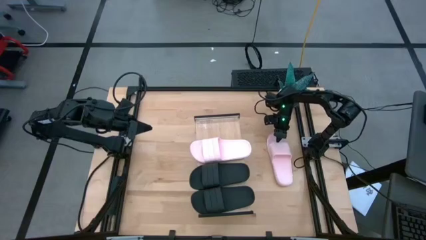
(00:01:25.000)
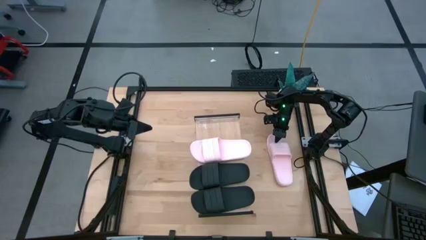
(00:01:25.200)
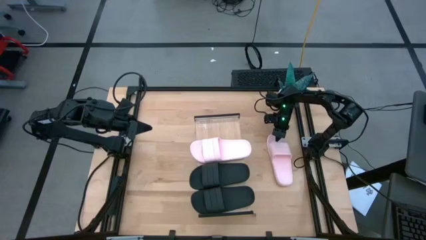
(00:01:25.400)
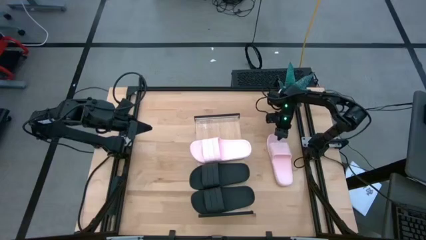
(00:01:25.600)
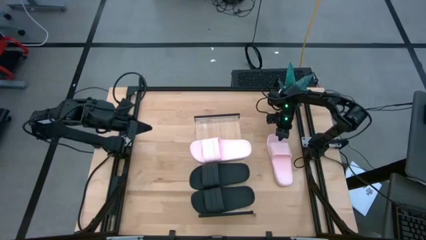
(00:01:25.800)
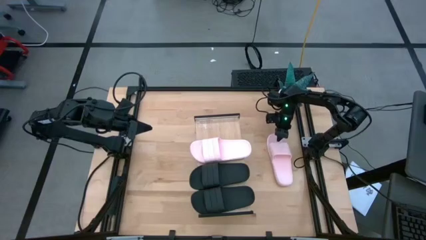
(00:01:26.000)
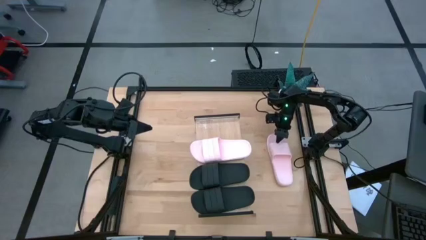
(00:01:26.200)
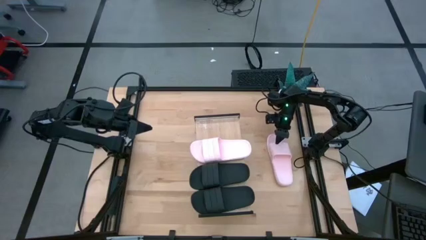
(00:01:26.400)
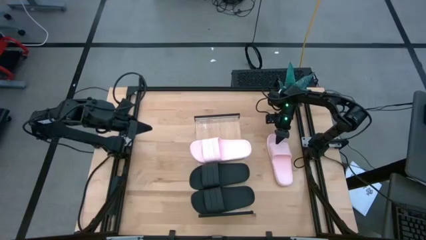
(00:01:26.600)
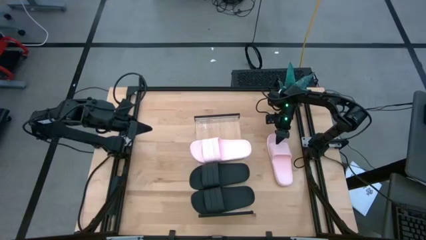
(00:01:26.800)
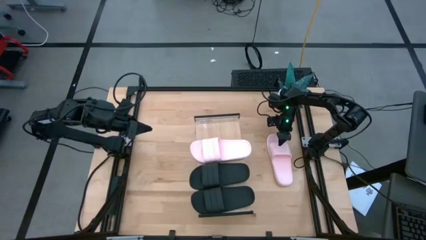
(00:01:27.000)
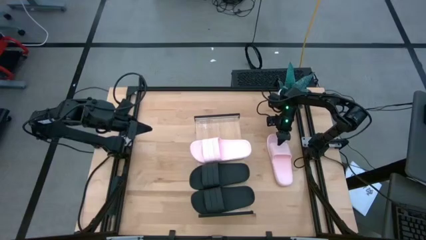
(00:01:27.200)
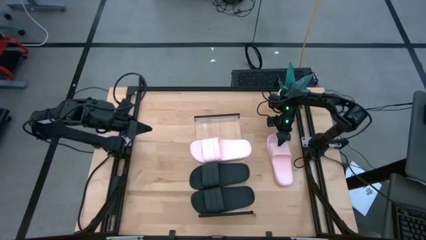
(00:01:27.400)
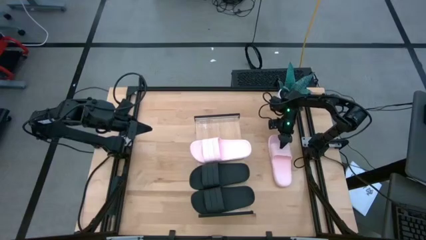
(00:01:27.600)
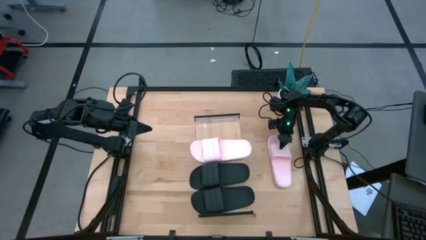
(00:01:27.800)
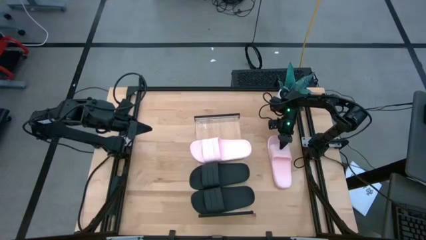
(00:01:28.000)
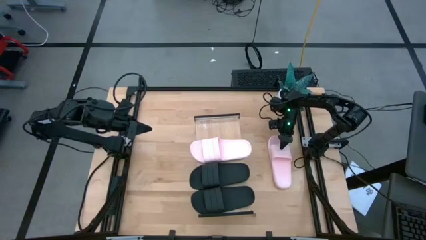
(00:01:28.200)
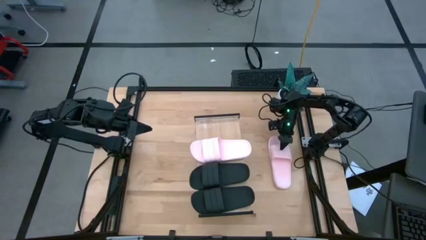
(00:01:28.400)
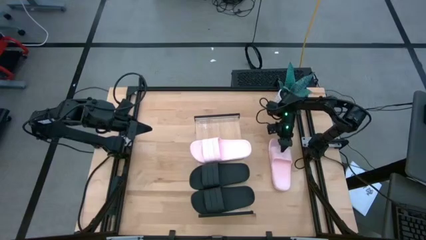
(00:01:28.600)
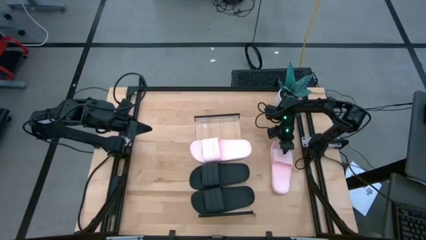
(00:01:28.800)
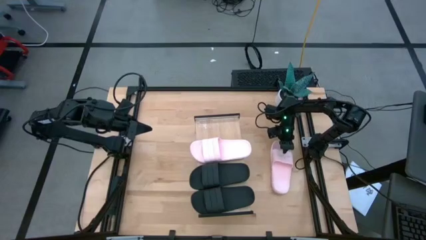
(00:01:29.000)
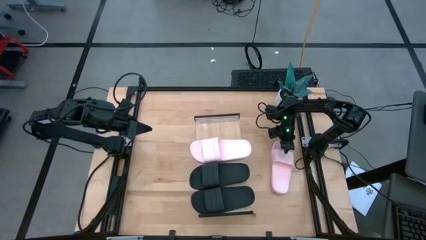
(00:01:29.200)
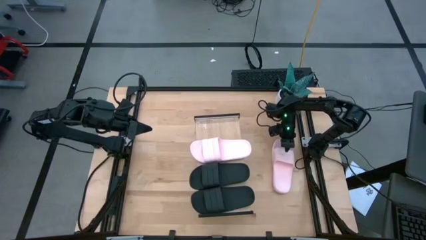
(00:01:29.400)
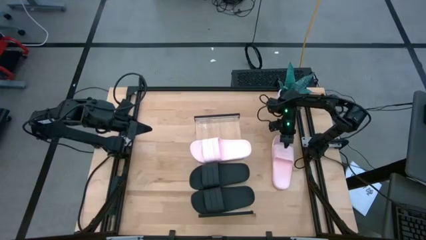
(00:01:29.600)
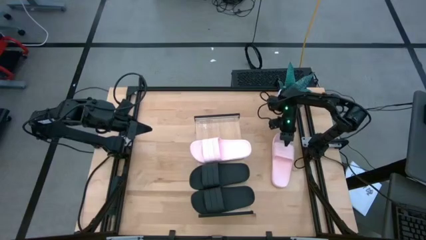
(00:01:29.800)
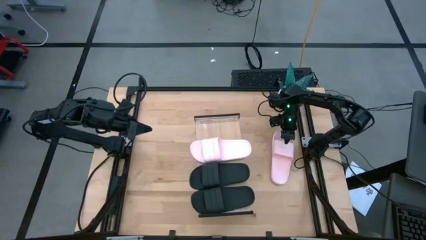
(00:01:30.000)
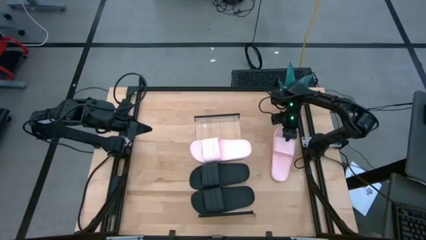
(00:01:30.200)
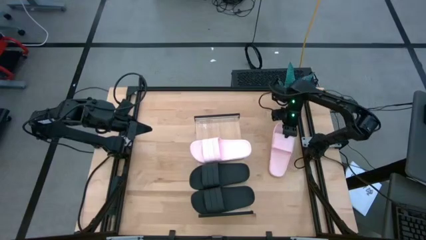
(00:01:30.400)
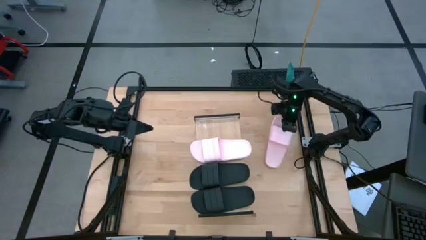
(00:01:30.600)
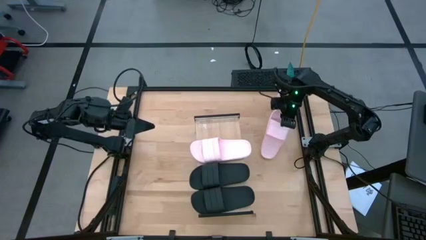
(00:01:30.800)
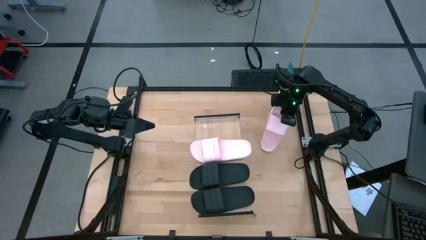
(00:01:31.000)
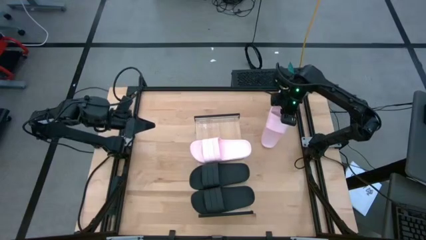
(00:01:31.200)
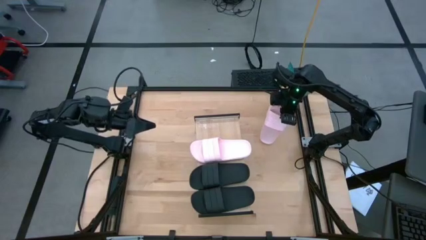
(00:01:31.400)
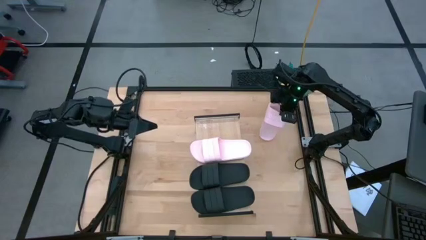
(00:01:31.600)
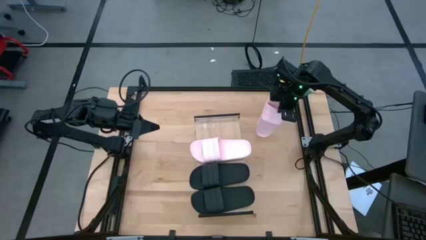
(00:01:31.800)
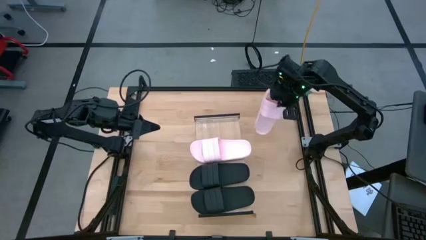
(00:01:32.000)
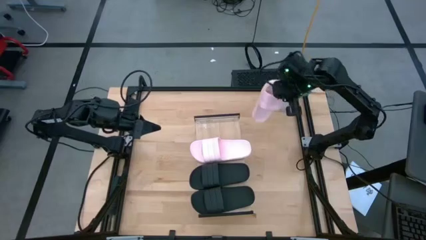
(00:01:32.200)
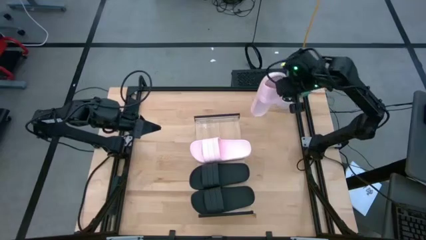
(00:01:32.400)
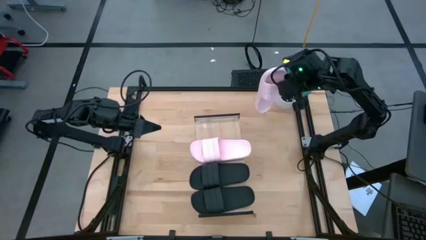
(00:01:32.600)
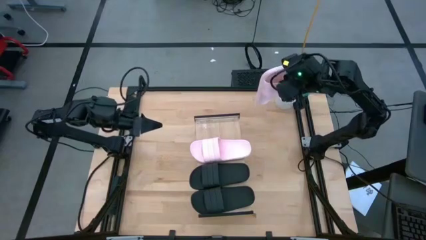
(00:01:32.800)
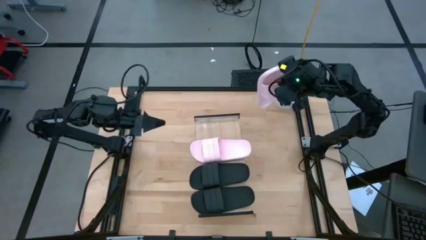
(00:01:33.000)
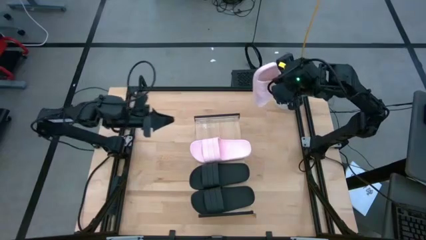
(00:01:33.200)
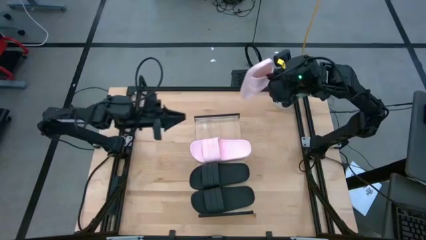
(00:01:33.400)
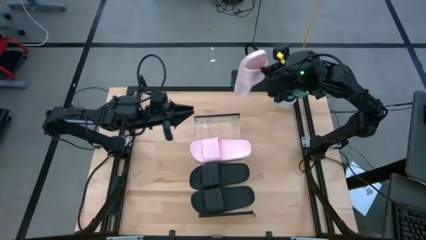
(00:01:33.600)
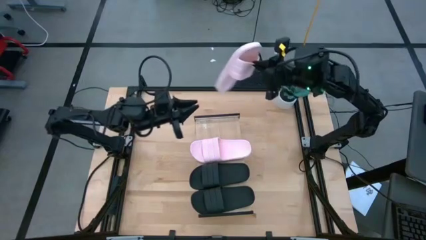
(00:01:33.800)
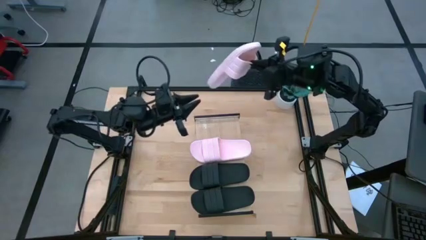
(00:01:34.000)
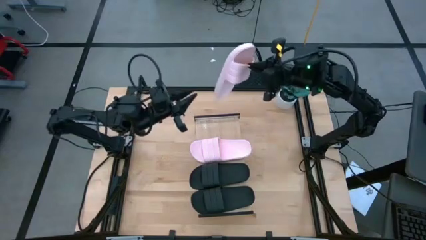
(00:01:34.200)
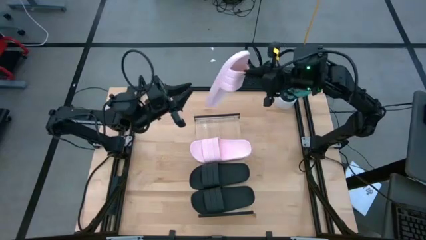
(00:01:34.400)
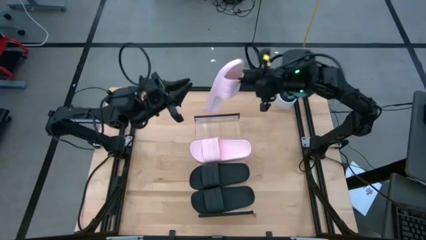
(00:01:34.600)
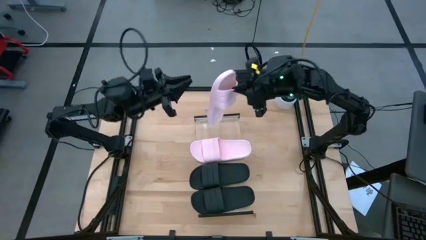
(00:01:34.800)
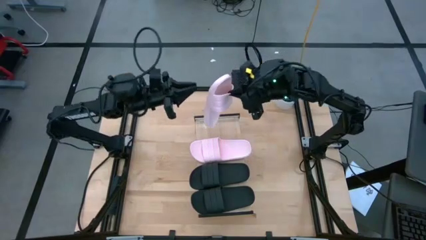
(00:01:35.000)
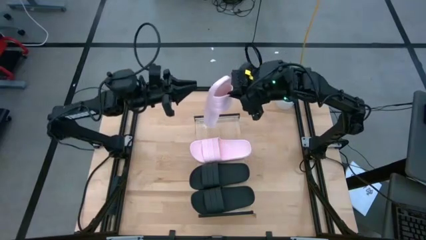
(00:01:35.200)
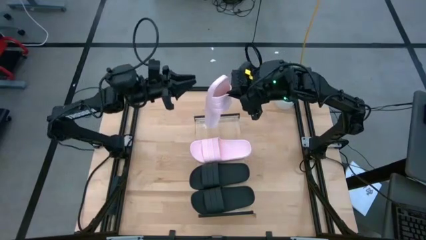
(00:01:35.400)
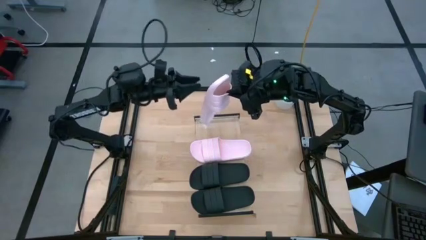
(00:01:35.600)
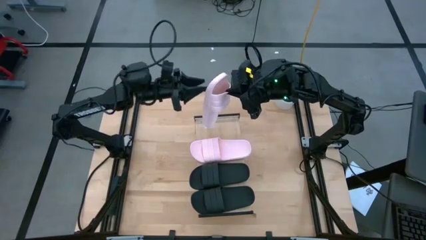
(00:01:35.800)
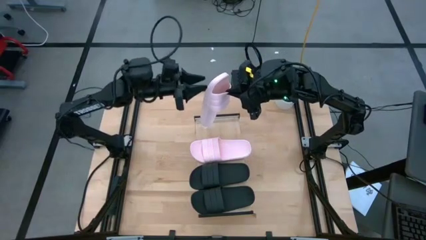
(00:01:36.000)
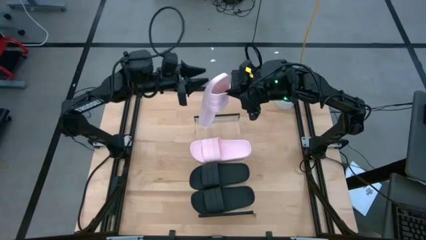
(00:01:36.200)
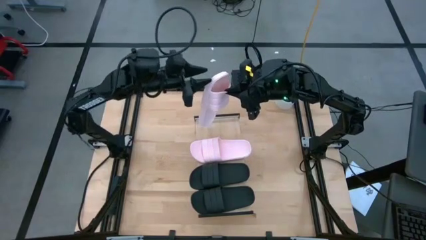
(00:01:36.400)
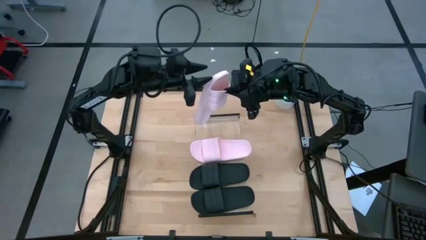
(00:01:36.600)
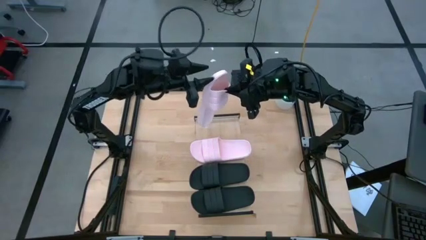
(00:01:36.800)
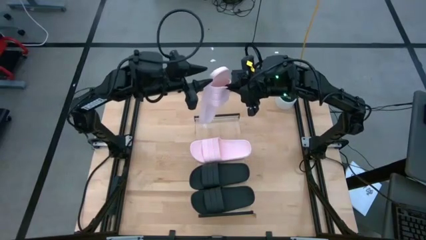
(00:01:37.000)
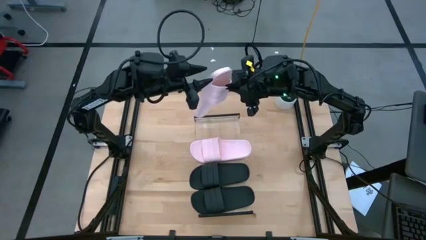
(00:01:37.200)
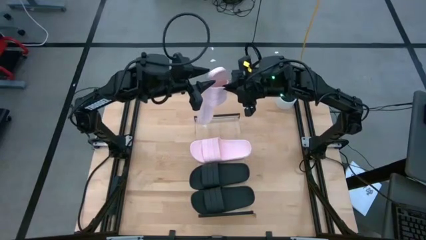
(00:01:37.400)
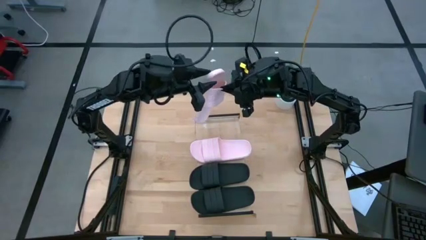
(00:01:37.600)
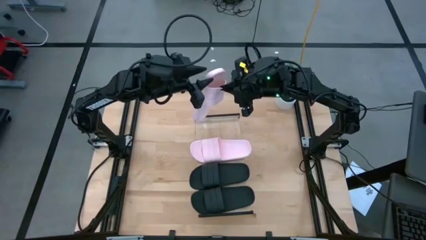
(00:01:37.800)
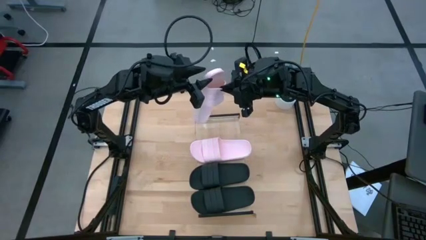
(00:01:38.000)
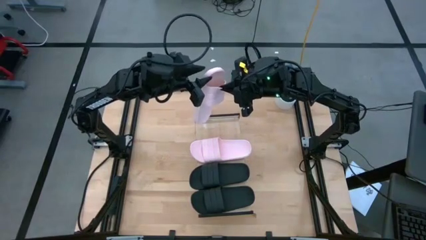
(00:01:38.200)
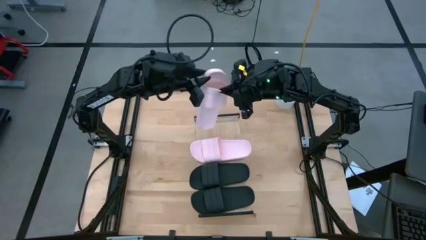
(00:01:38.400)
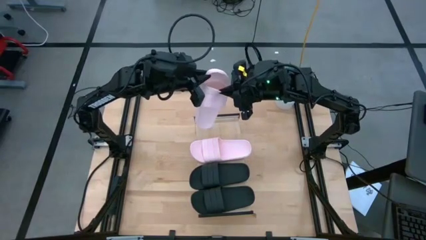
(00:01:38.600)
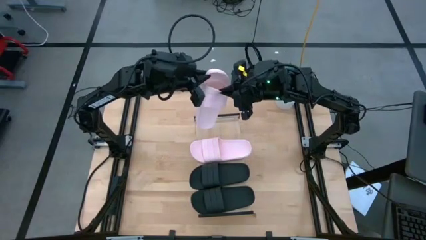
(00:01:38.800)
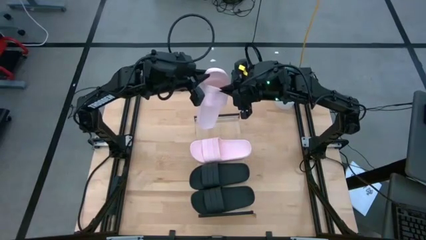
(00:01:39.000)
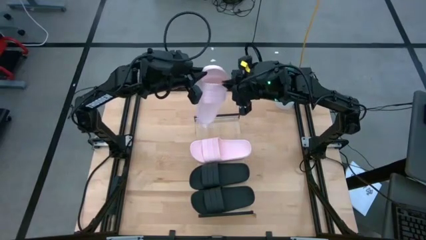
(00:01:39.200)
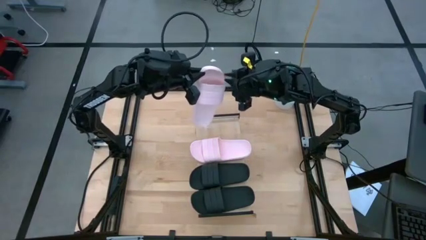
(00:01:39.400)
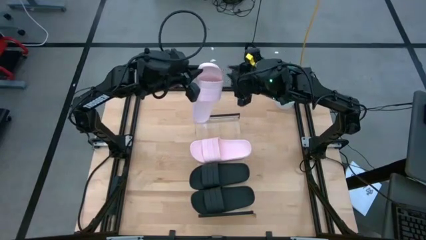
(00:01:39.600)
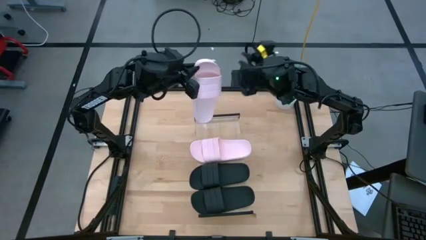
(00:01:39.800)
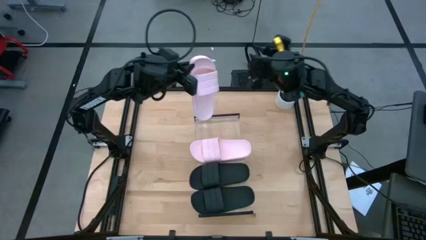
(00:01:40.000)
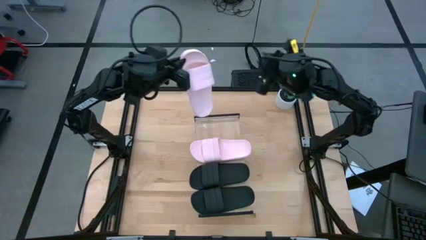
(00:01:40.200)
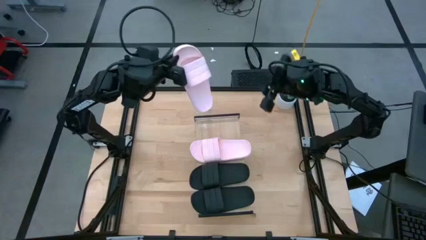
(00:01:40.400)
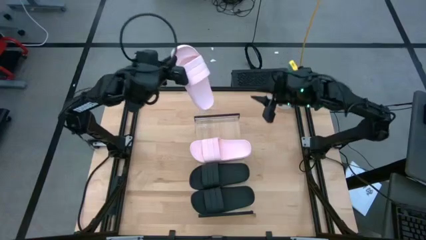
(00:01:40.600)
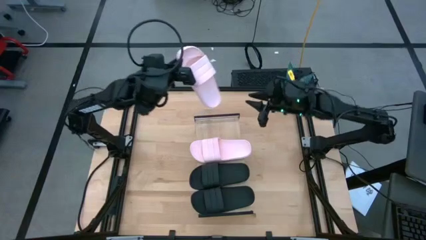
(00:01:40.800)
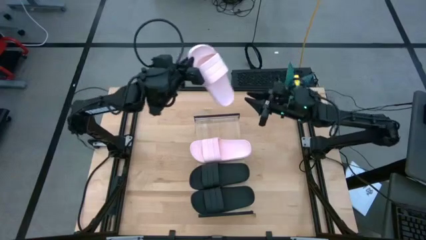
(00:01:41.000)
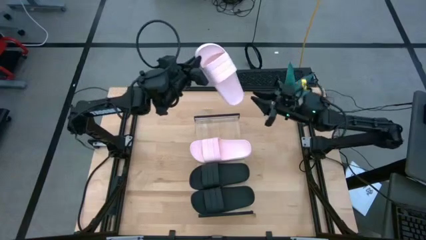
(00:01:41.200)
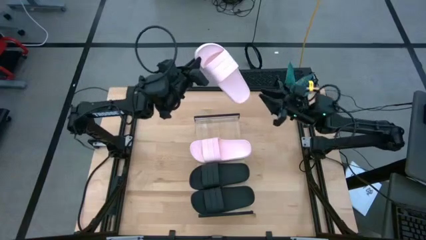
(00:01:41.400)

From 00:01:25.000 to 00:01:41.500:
Task: Pick and place slides into the shelf
Put the pink slides on the shelf
